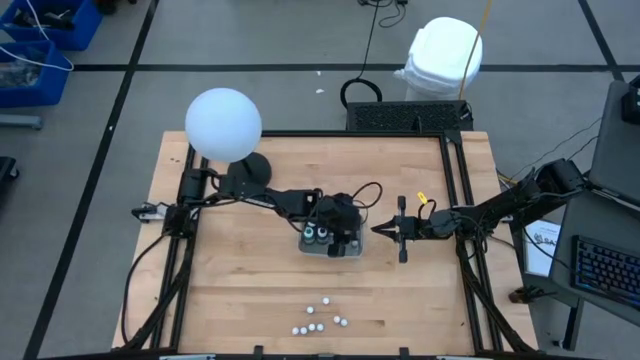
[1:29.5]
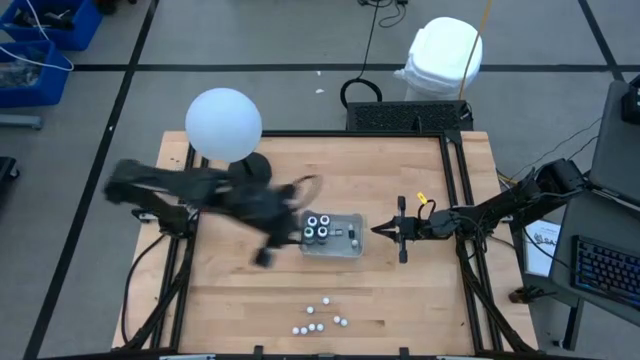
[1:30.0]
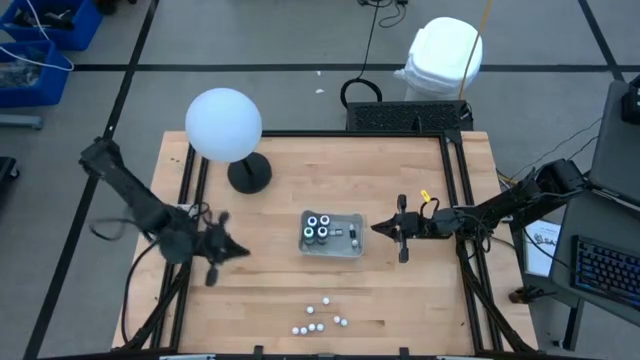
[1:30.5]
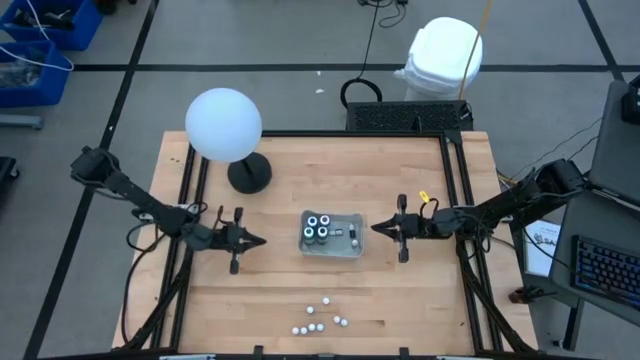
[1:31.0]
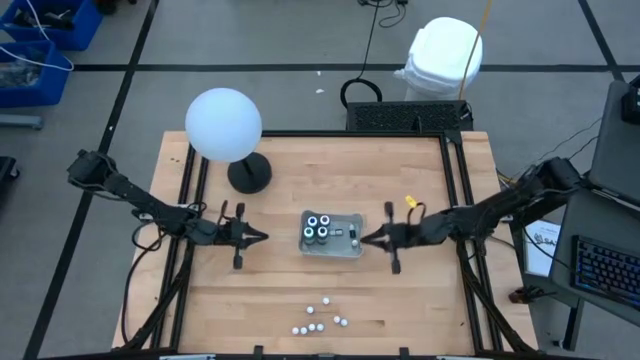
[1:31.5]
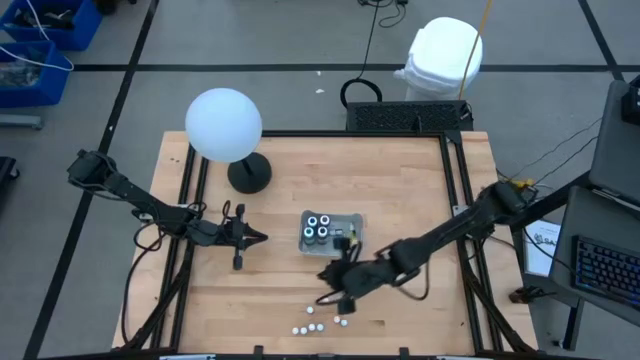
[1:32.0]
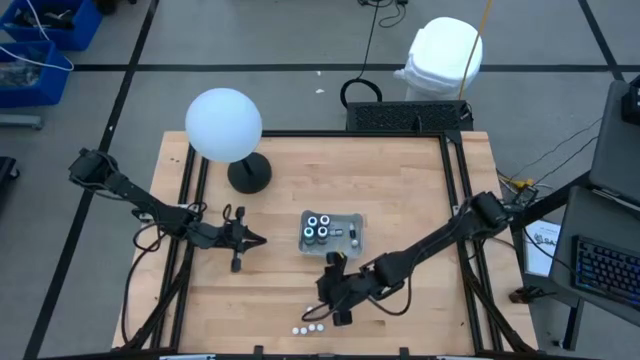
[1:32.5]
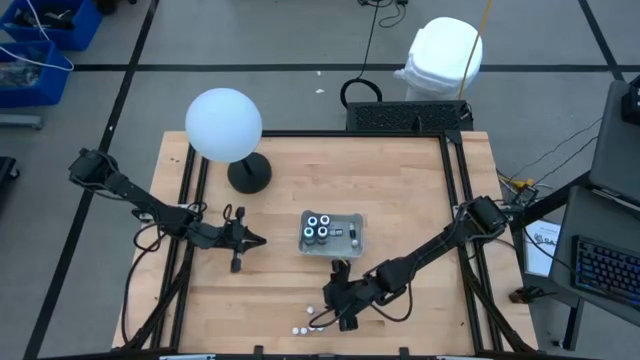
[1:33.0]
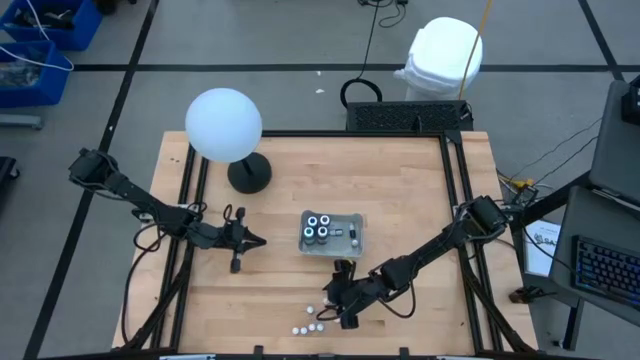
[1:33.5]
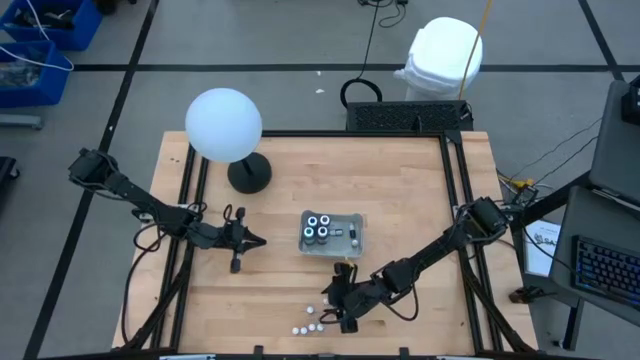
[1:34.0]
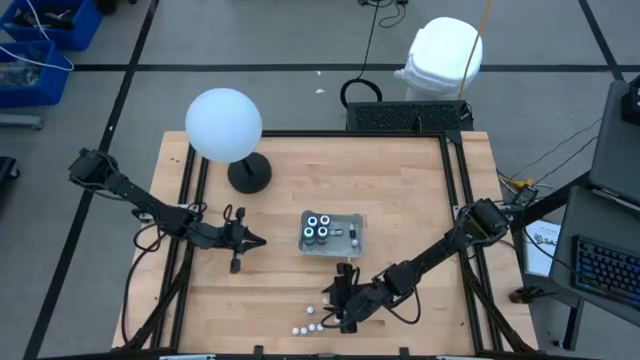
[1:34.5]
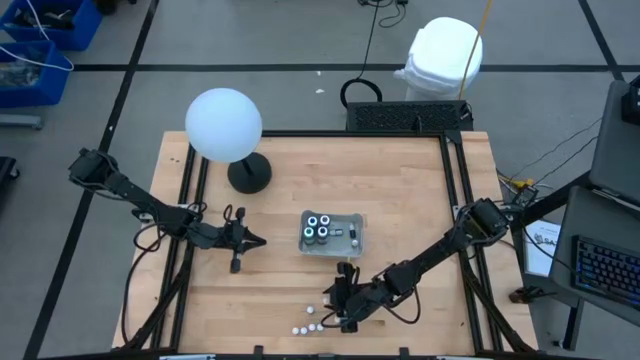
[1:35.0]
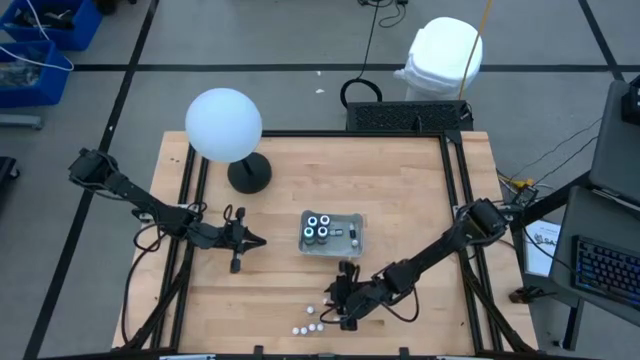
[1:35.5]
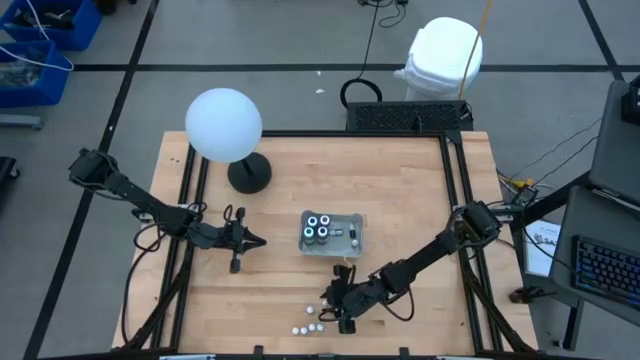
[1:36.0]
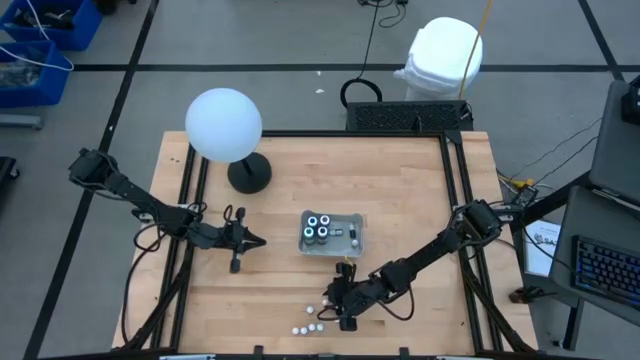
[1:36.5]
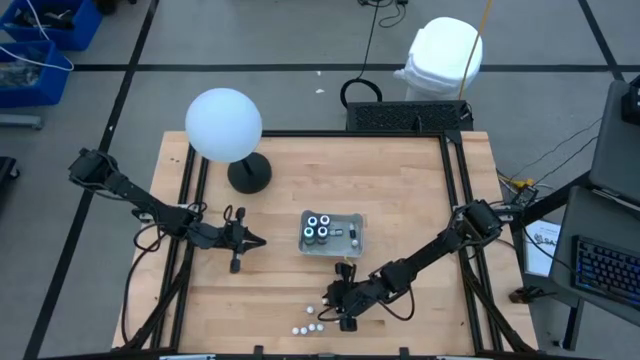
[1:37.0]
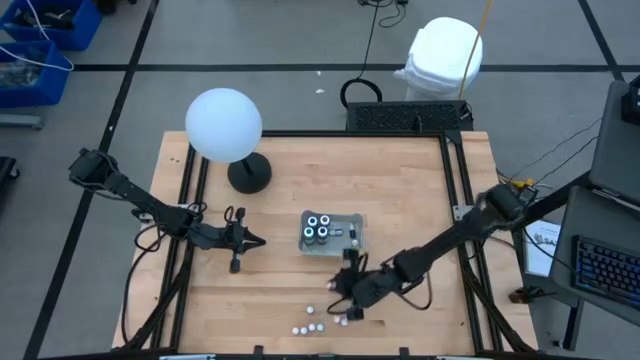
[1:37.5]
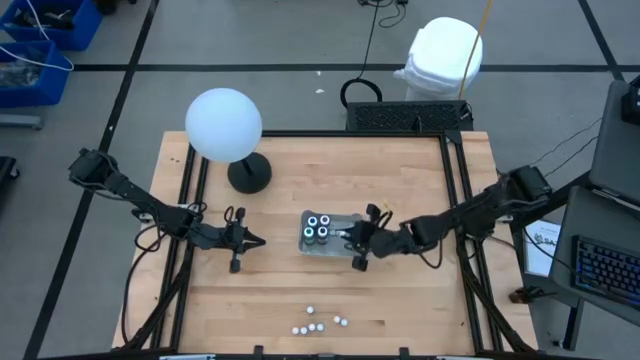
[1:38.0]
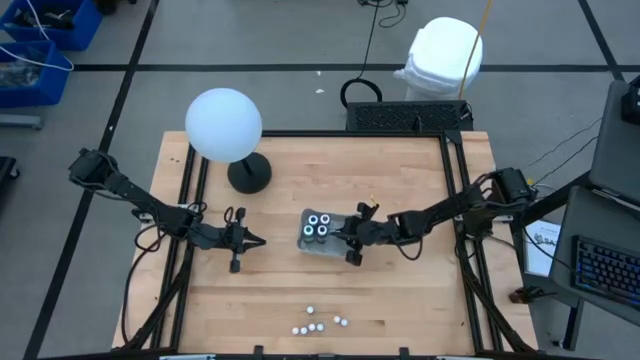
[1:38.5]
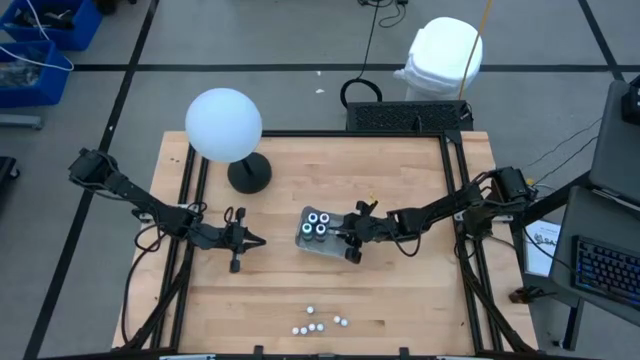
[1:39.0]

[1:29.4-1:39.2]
Task: Pick & Place food coloring
Put the small yellow food coloring bottle into the gray bin

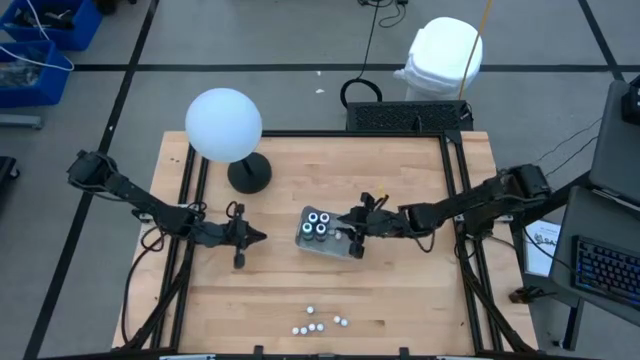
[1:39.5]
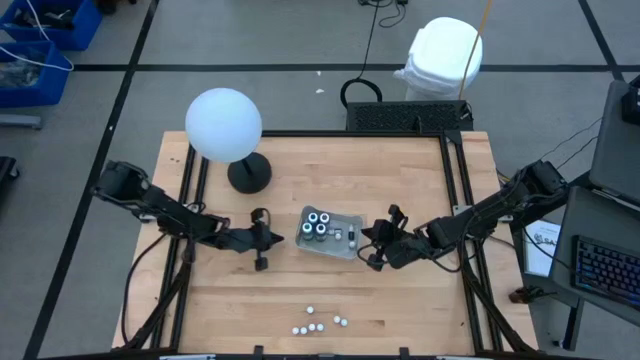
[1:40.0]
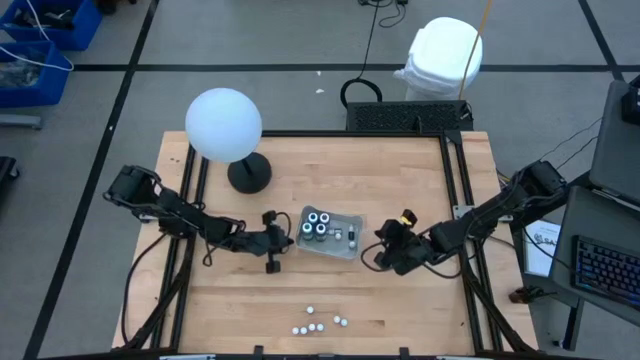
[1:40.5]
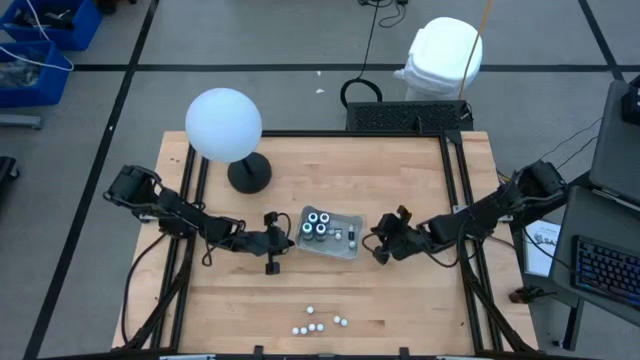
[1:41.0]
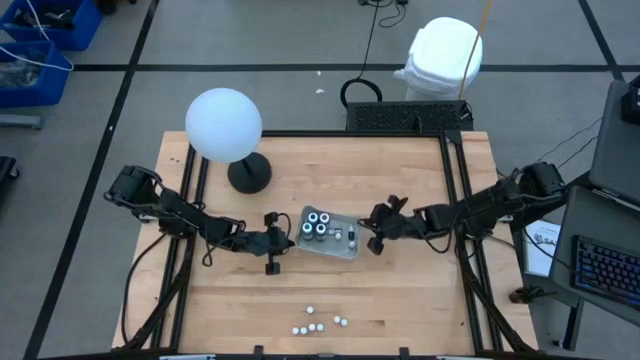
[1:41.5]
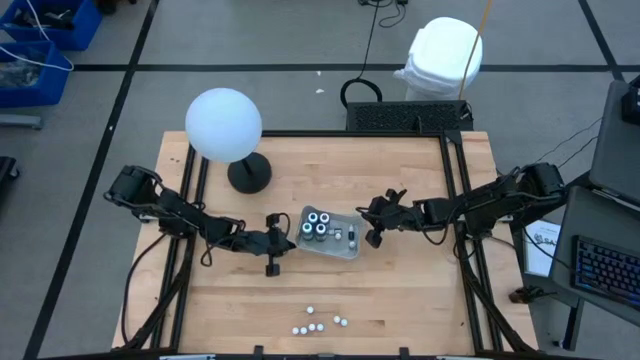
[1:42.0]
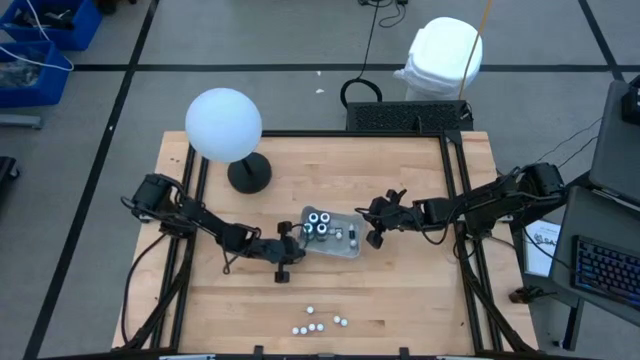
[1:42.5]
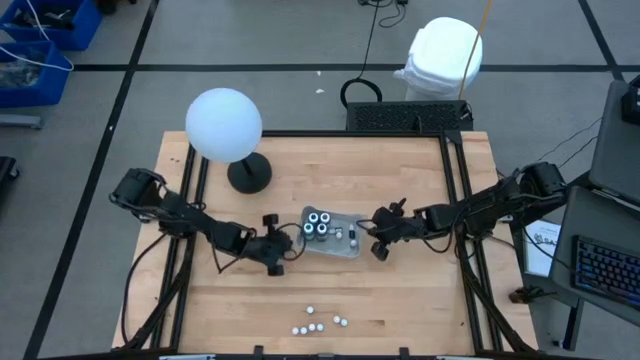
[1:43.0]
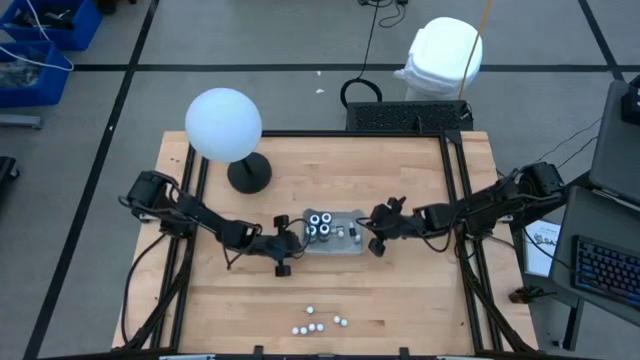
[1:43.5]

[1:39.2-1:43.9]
Adjust the gray bin

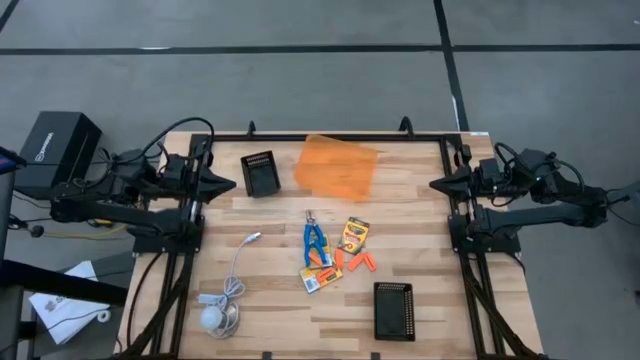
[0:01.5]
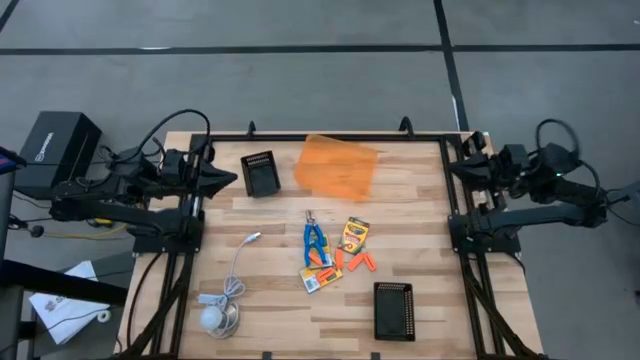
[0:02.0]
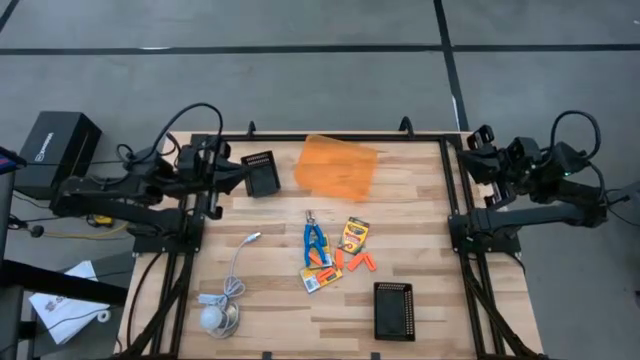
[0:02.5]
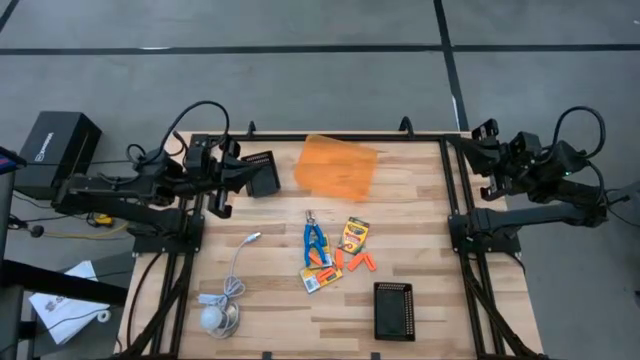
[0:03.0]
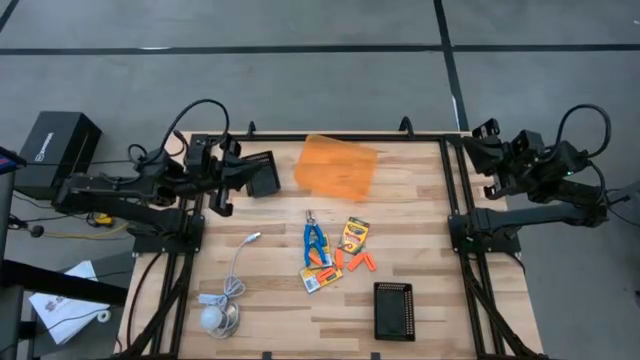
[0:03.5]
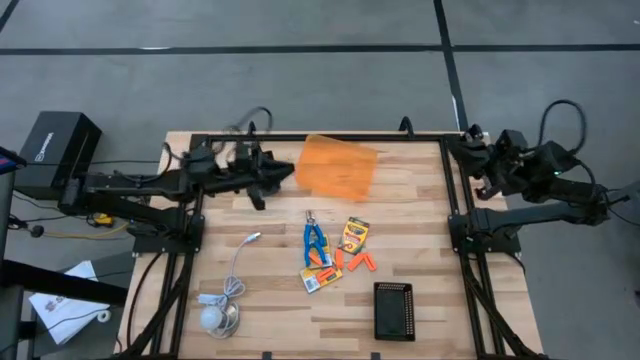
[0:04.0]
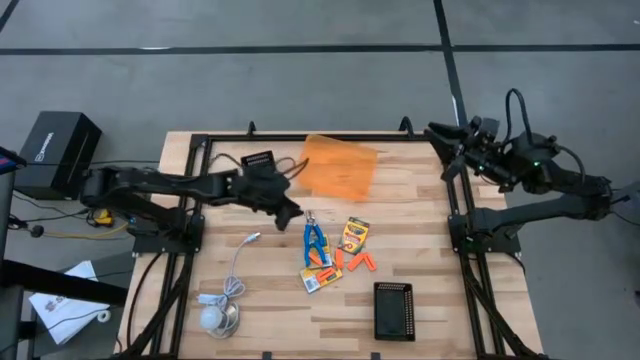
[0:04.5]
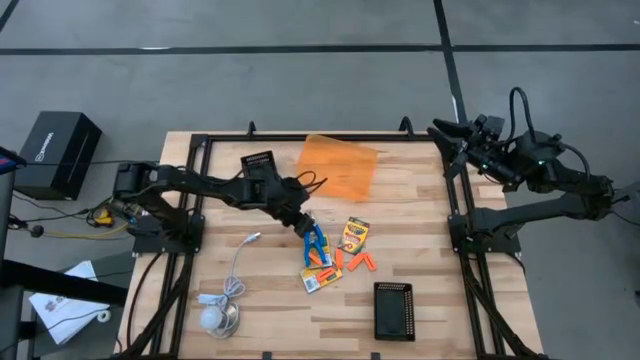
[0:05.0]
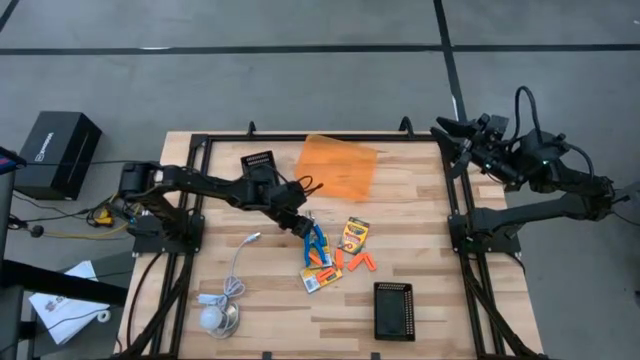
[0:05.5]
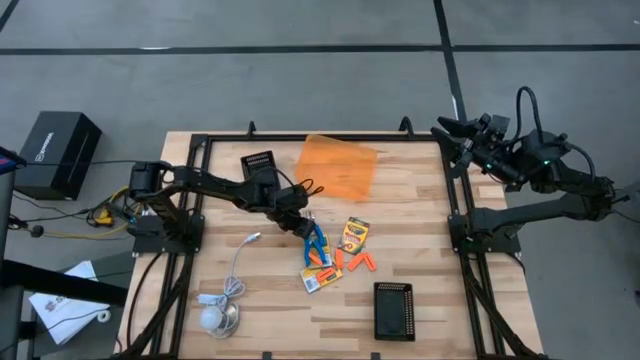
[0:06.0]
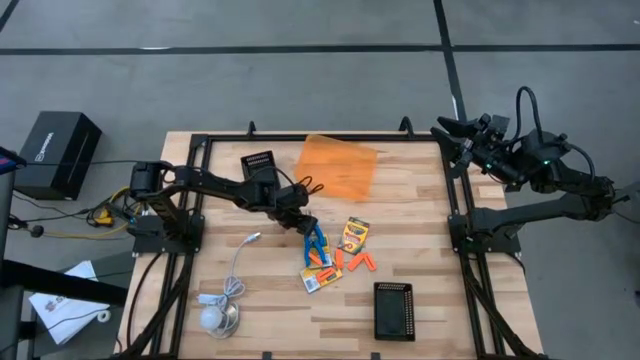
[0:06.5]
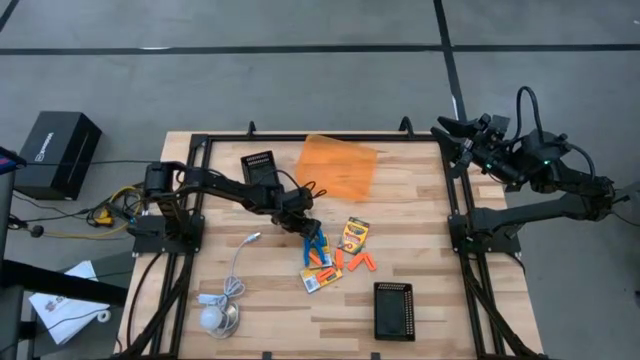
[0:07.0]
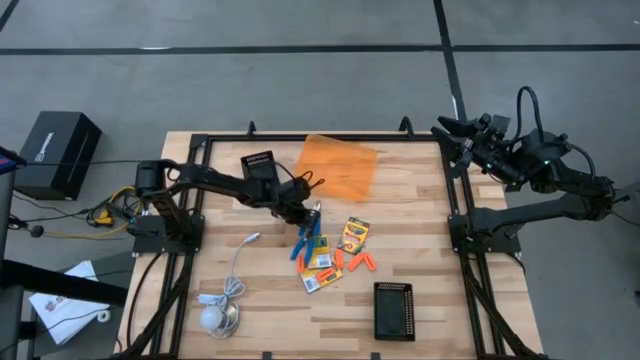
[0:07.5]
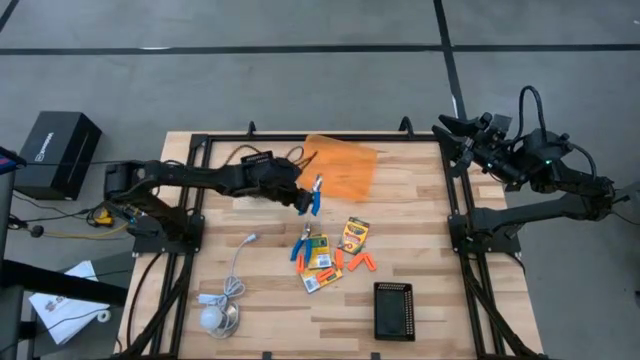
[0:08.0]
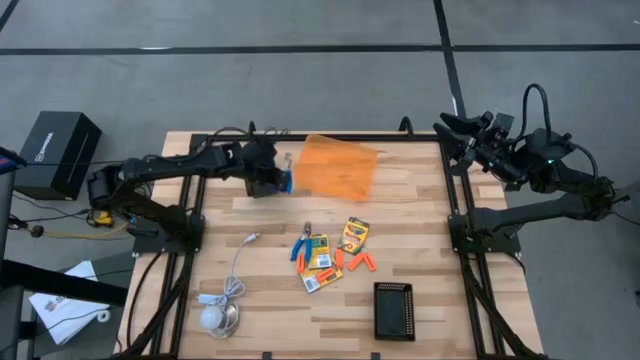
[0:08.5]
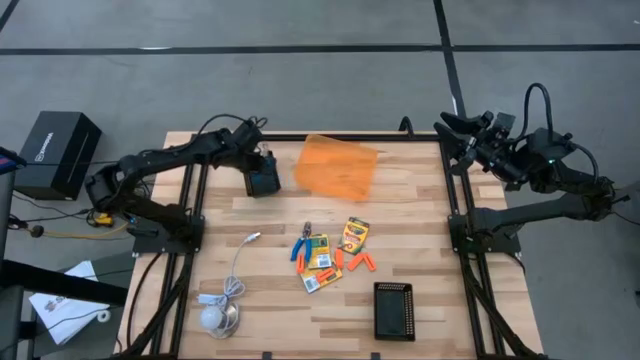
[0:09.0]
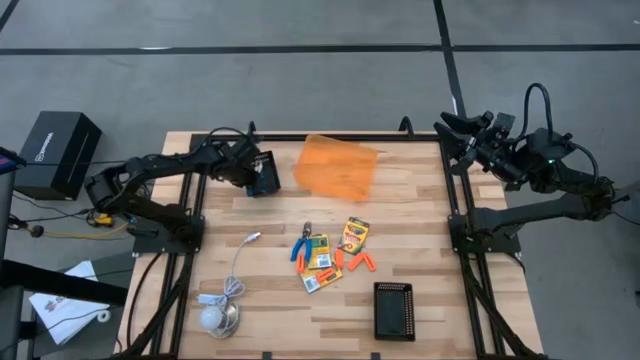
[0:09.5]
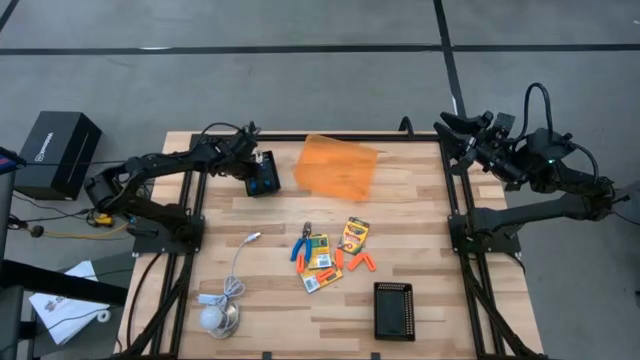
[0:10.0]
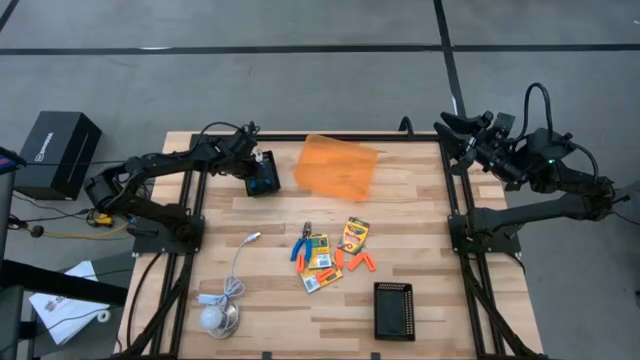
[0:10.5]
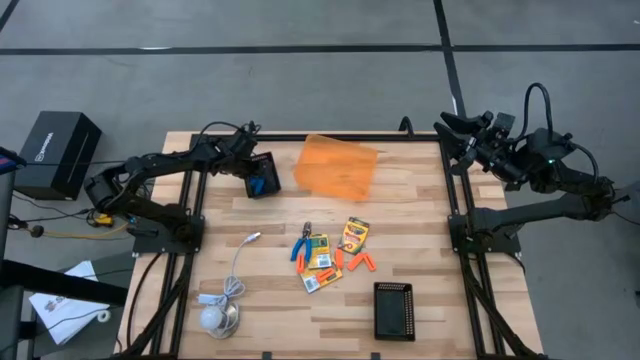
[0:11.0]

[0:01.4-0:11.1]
Task: Pick & Place School Supplies
Put the hole puncher into the top black bin
